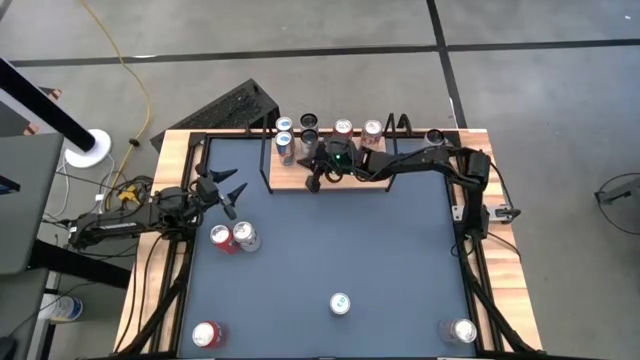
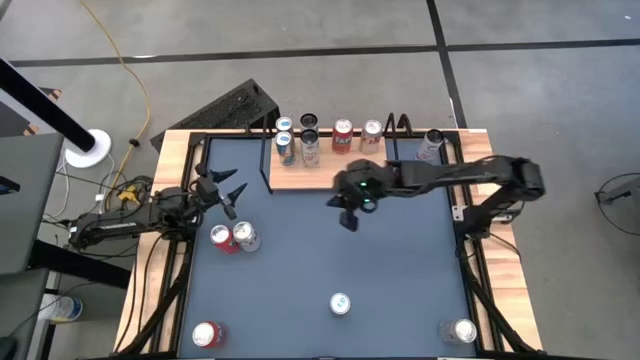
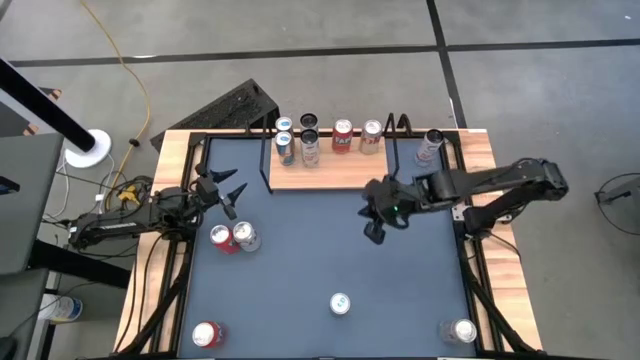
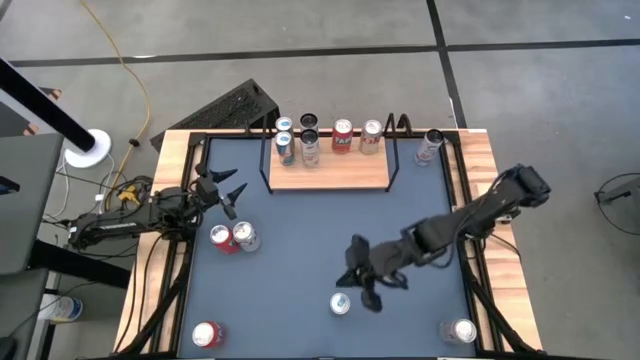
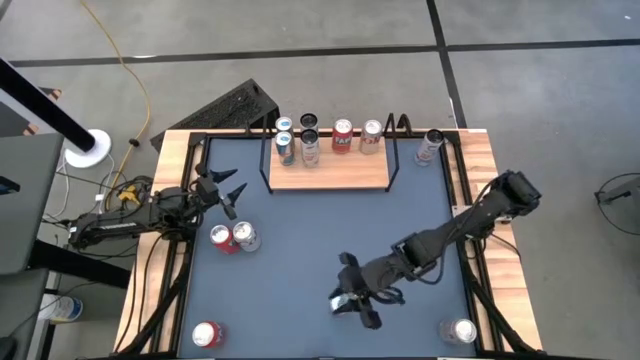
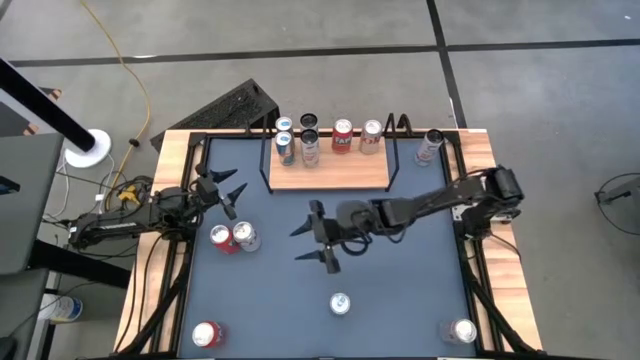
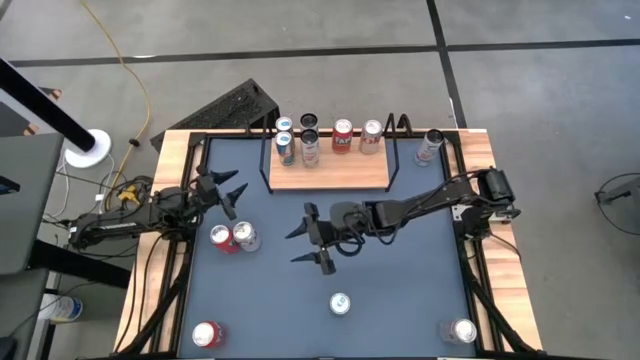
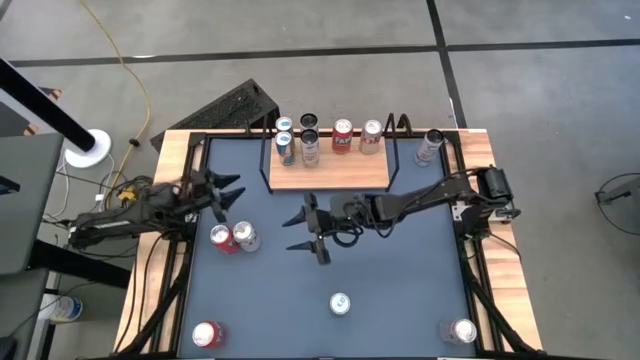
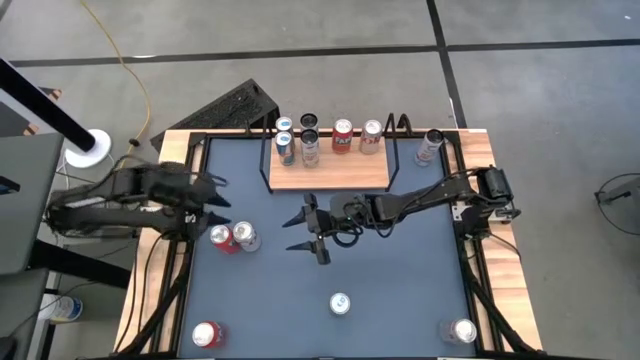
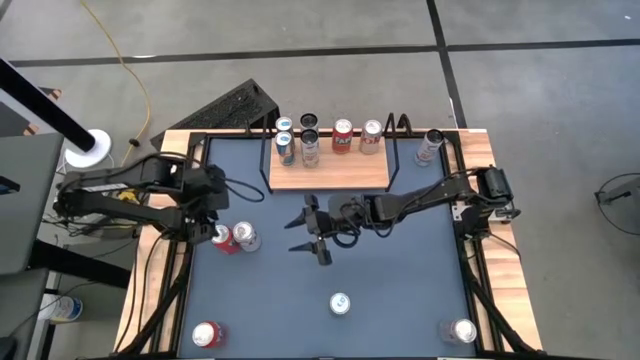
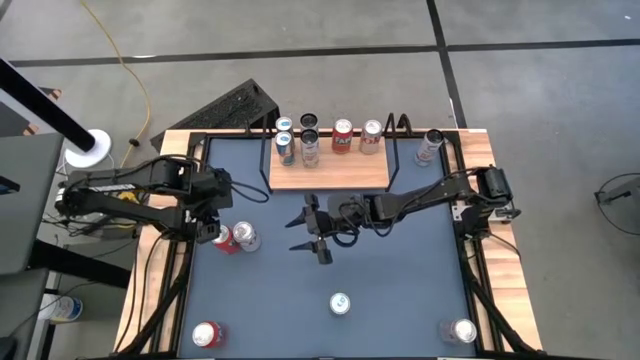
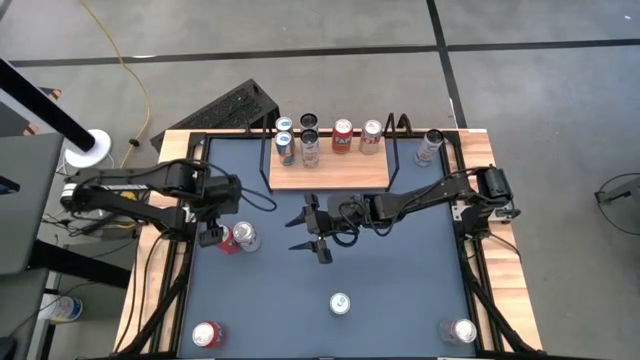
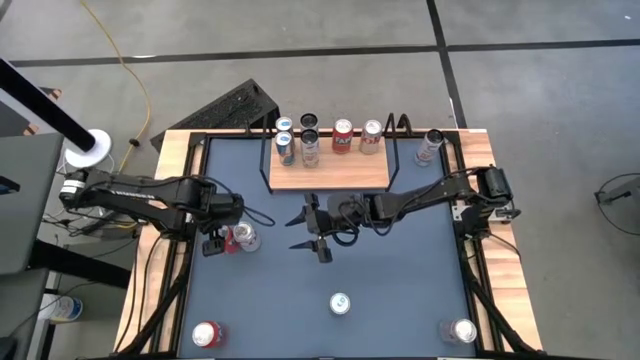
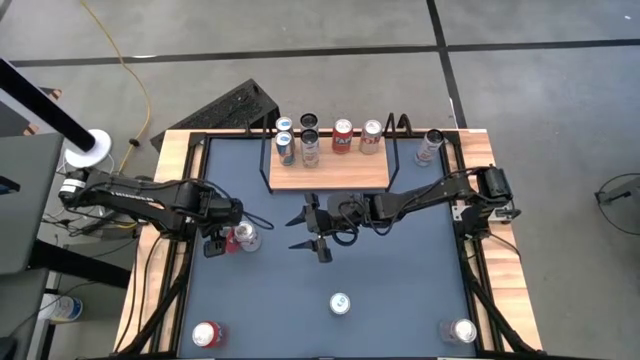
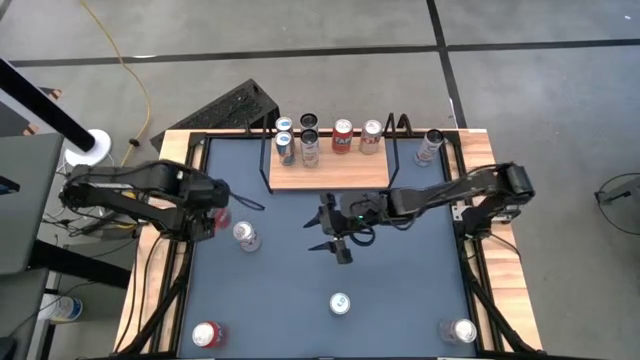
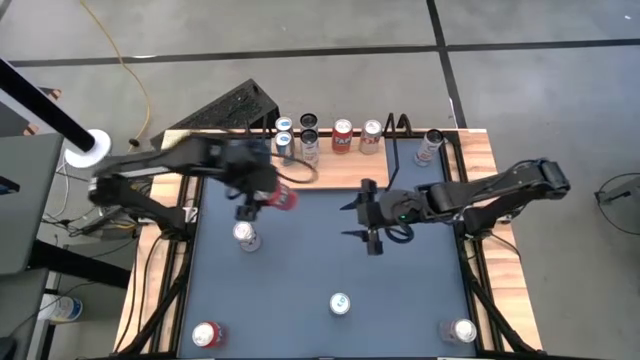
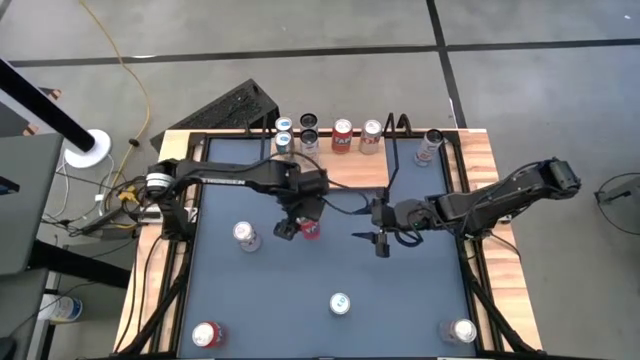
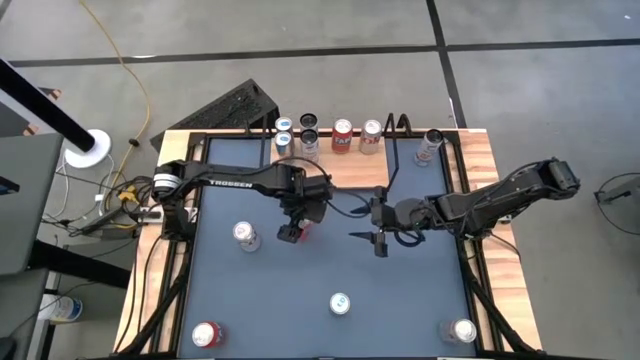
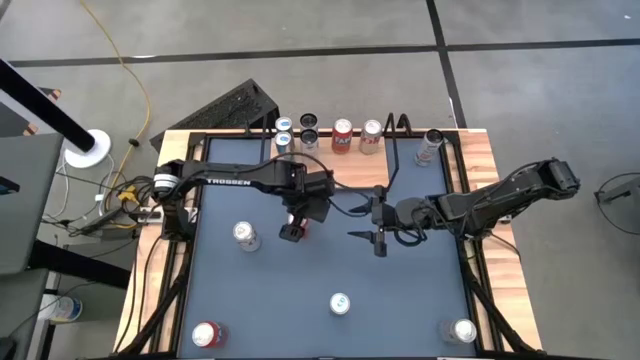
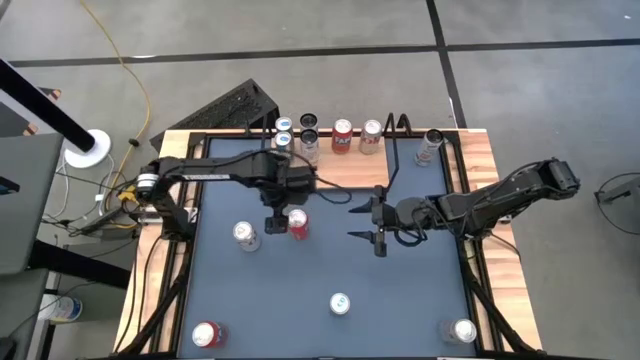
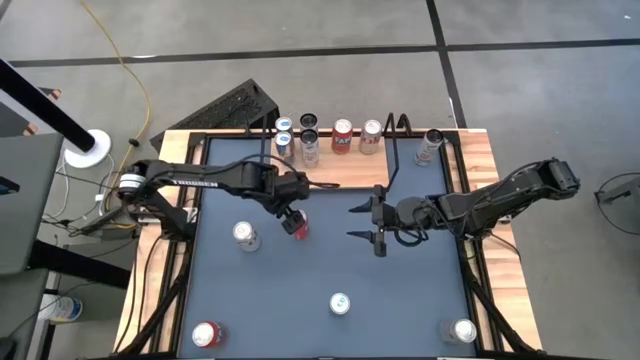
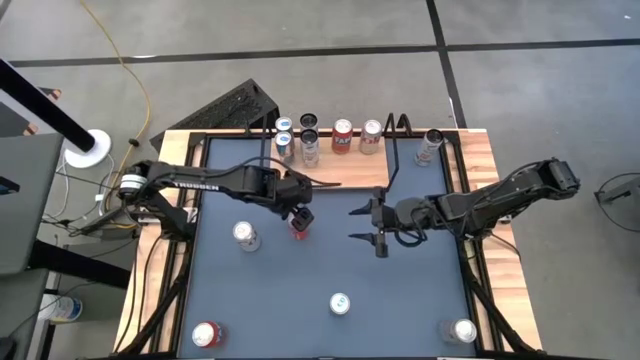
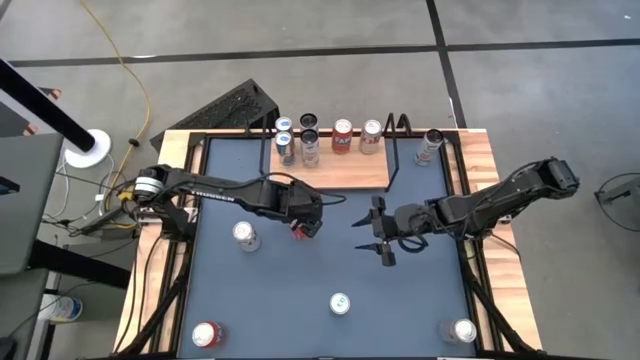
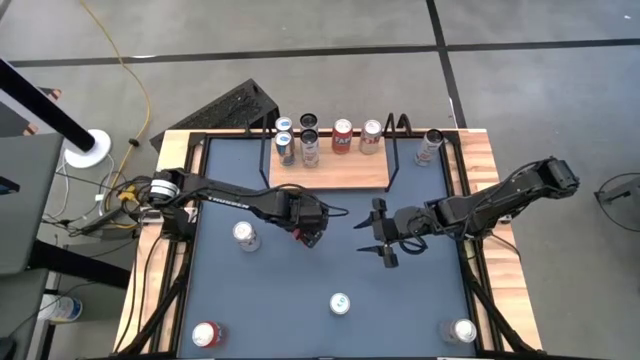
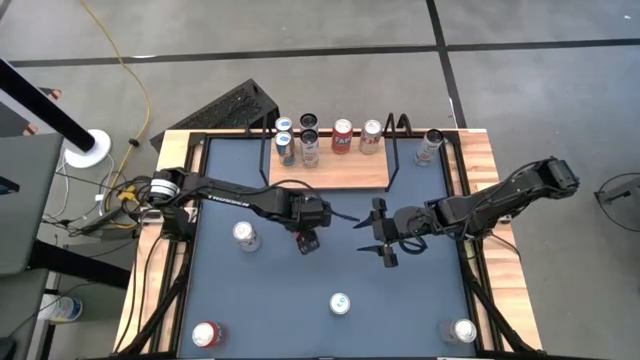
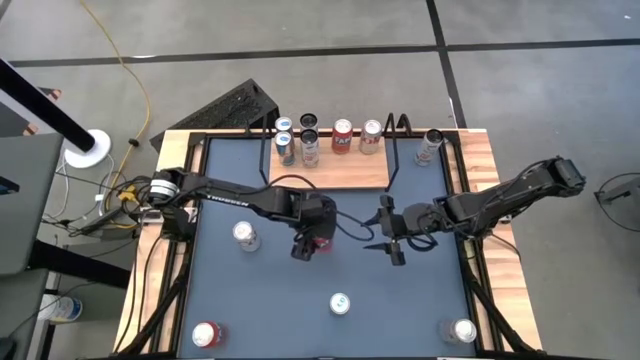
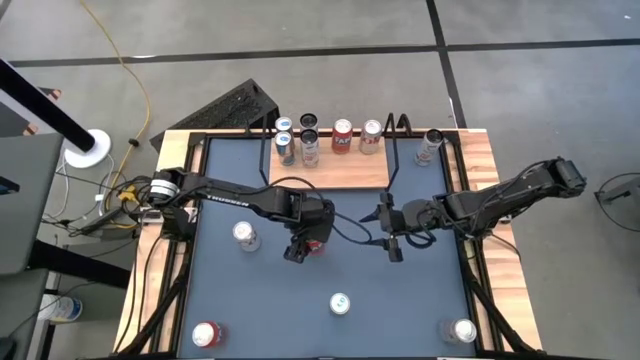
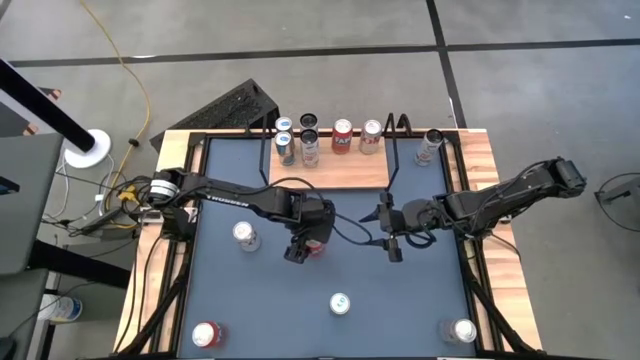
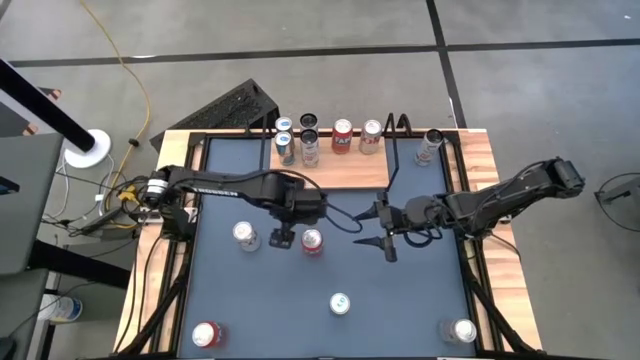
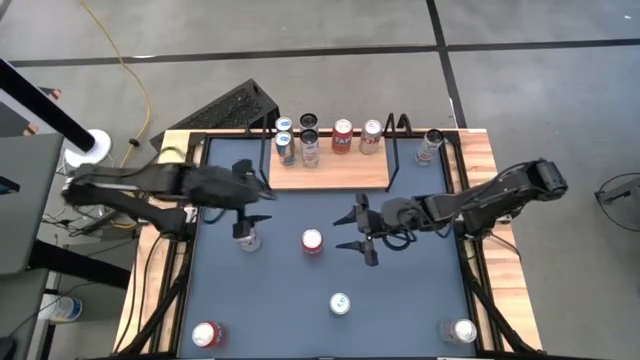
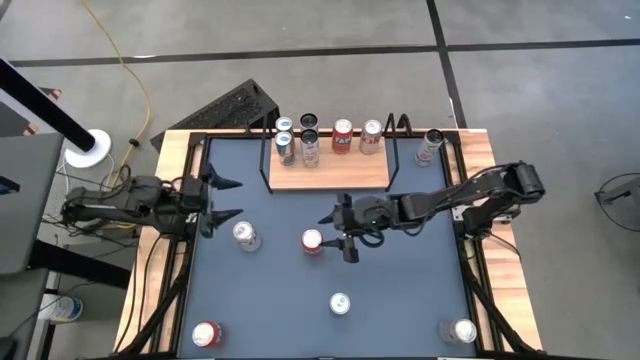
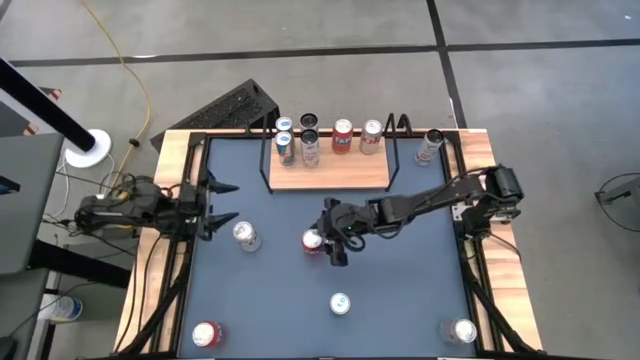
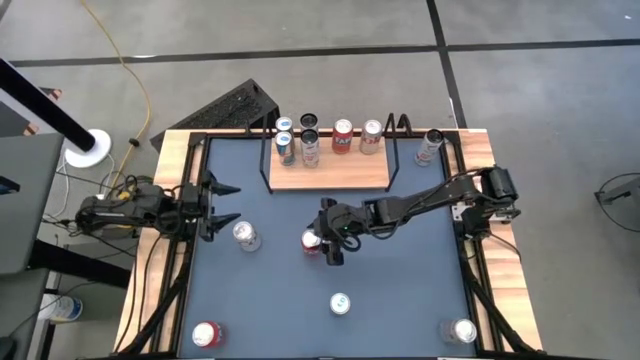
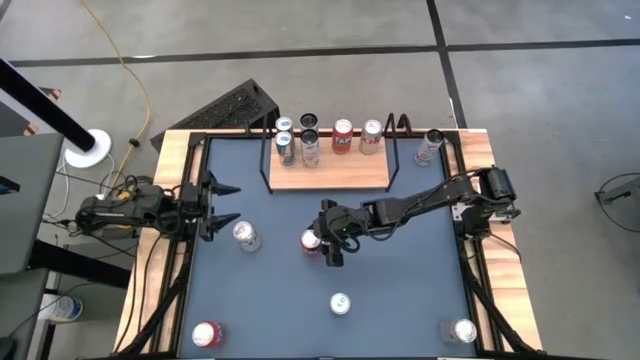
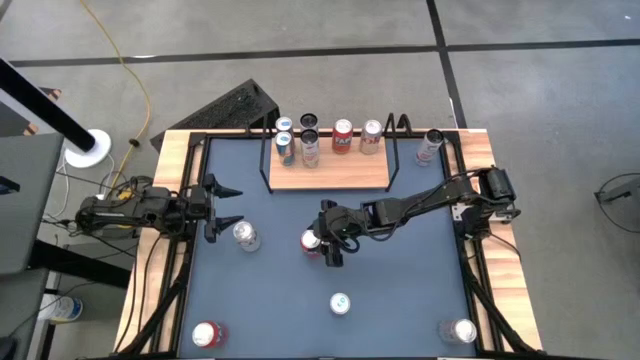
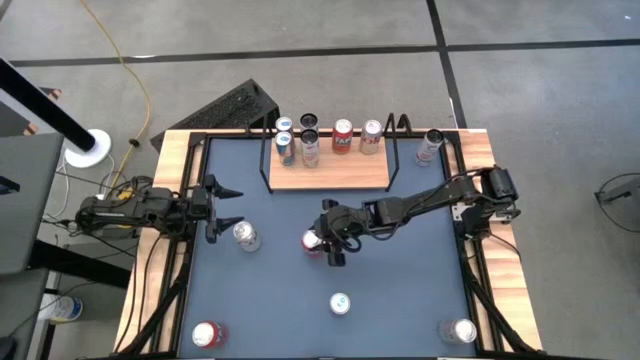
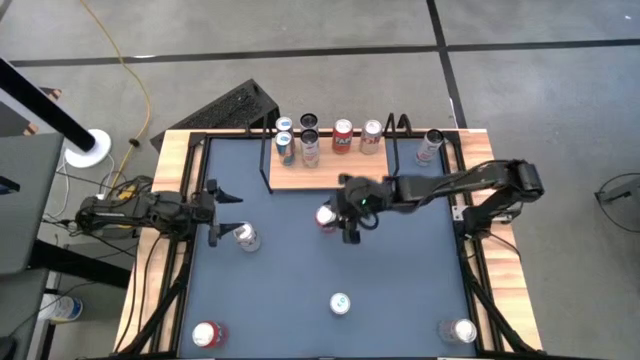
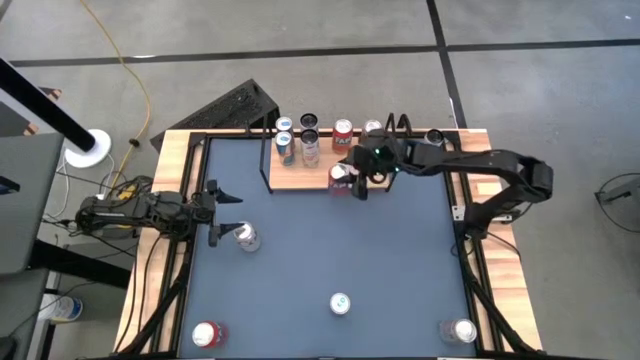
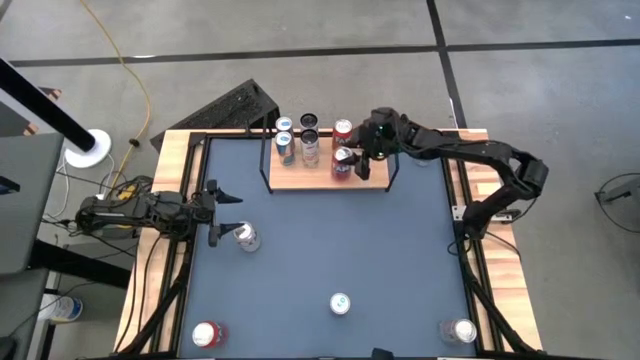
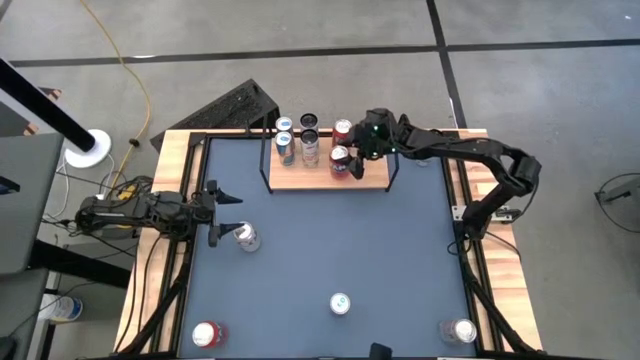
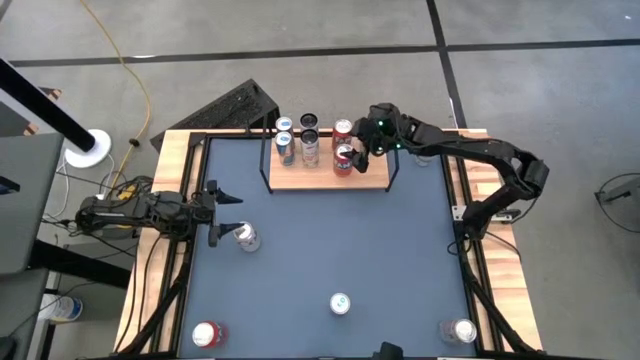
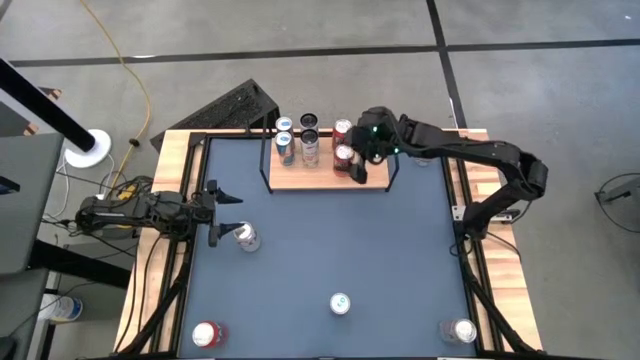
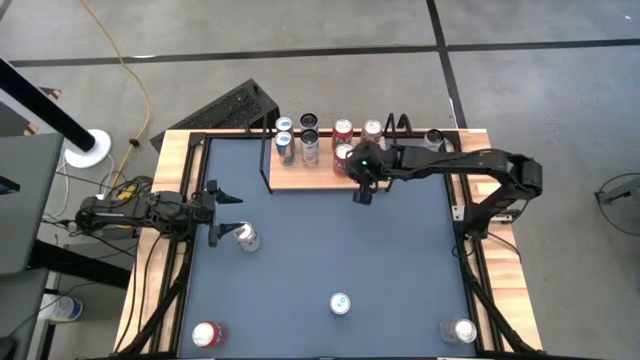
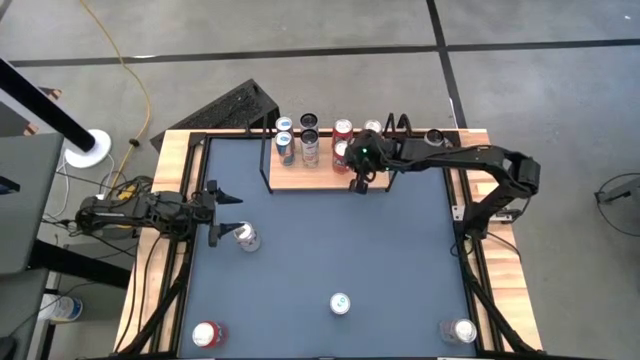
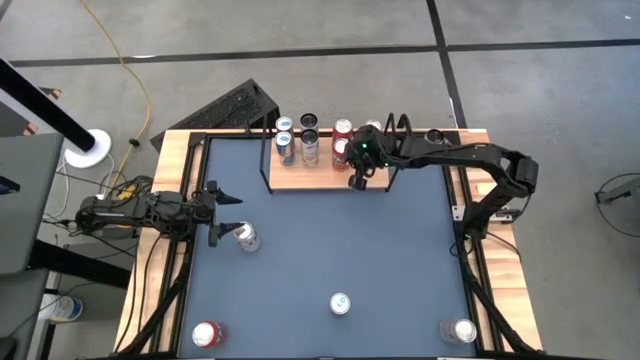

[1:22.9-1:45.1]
Task: Place canned beverage on shelf
Put the top orange soda can on the shelf aligned with the other orange soda can
